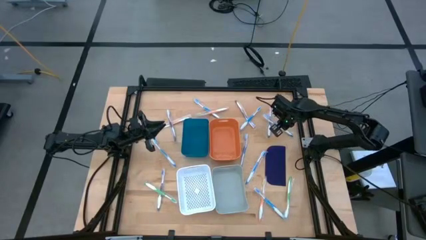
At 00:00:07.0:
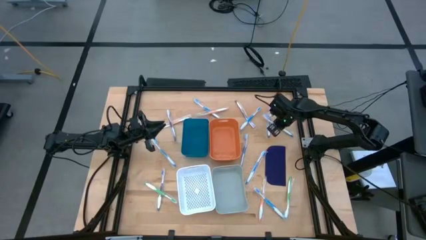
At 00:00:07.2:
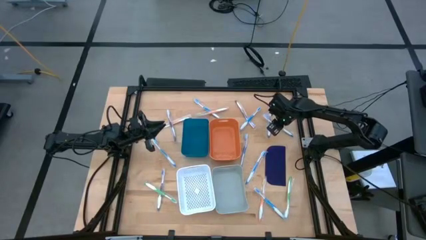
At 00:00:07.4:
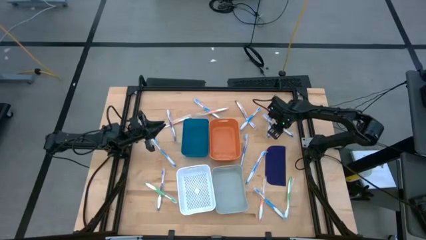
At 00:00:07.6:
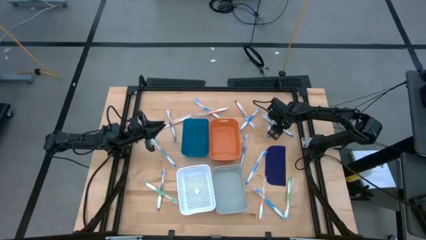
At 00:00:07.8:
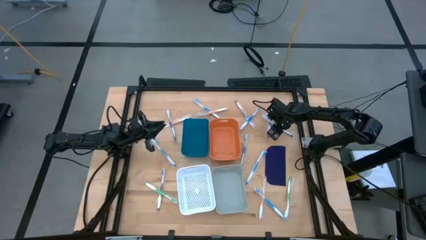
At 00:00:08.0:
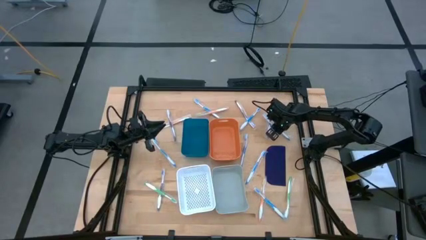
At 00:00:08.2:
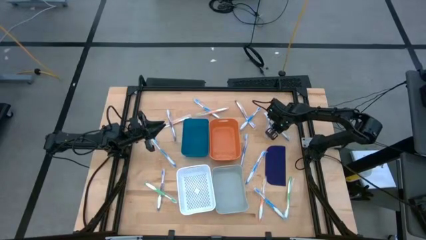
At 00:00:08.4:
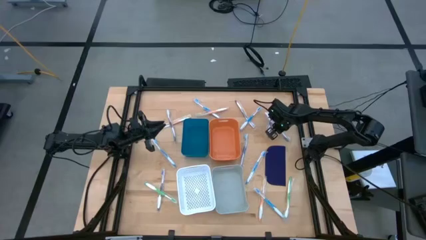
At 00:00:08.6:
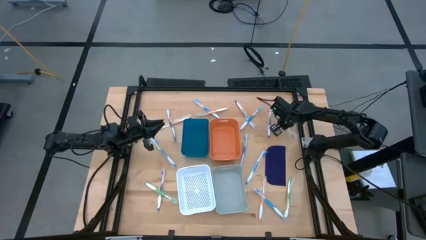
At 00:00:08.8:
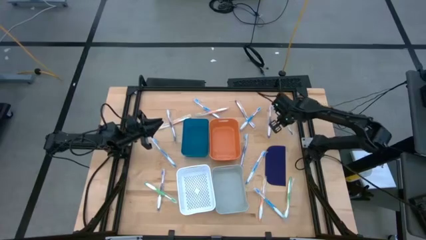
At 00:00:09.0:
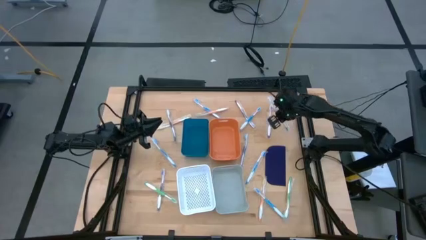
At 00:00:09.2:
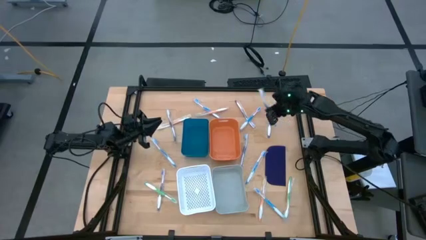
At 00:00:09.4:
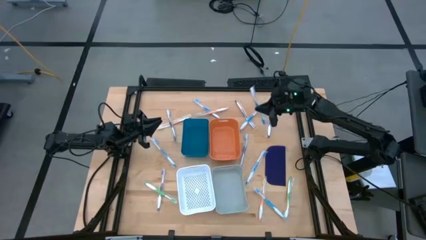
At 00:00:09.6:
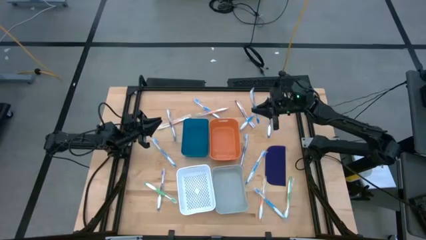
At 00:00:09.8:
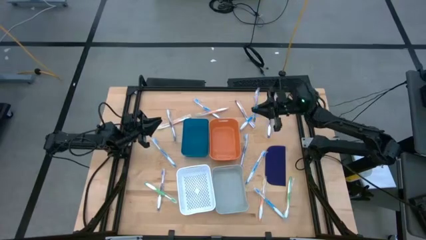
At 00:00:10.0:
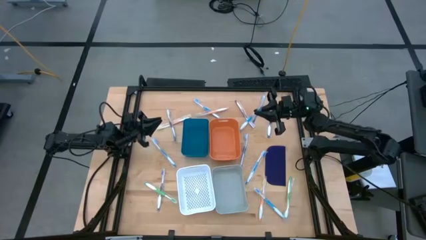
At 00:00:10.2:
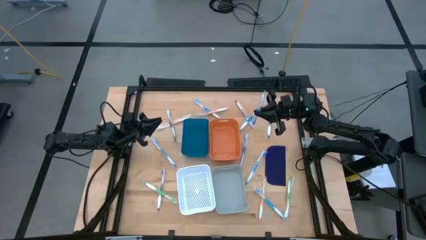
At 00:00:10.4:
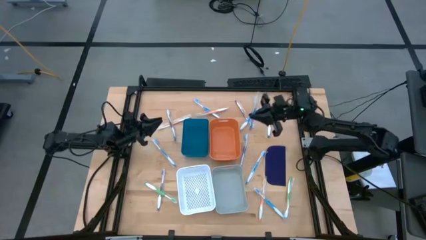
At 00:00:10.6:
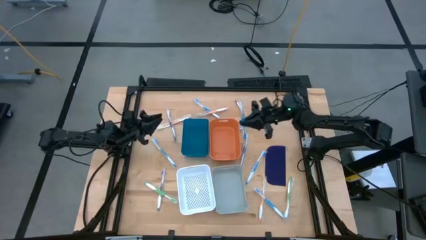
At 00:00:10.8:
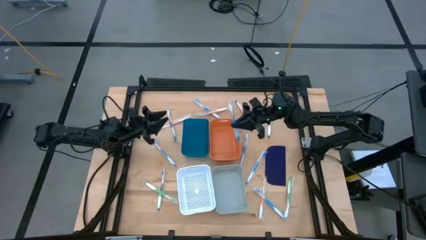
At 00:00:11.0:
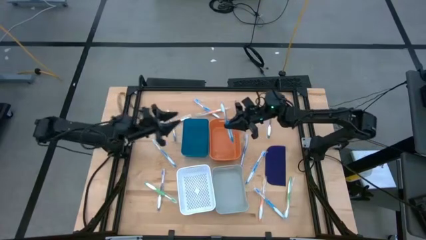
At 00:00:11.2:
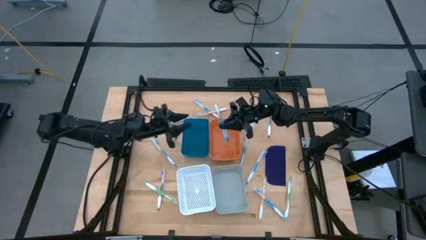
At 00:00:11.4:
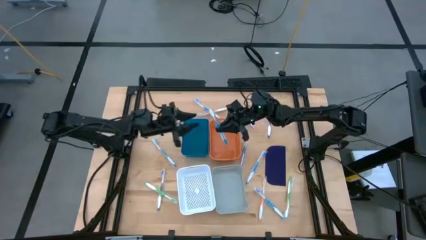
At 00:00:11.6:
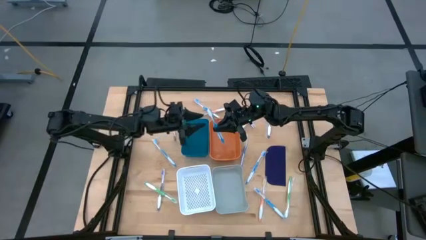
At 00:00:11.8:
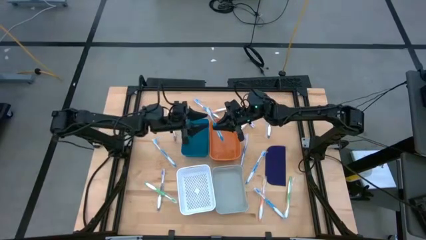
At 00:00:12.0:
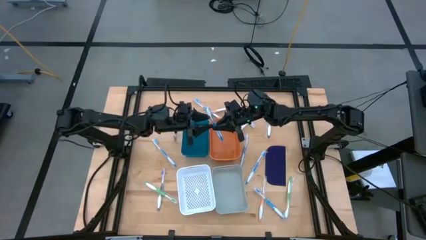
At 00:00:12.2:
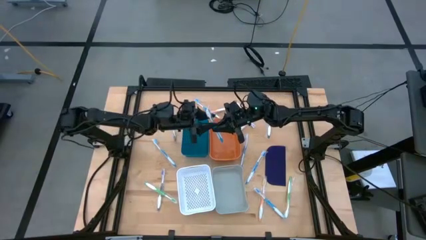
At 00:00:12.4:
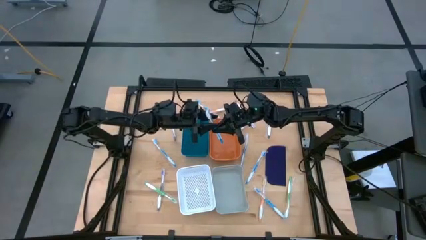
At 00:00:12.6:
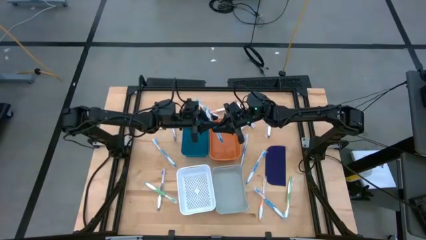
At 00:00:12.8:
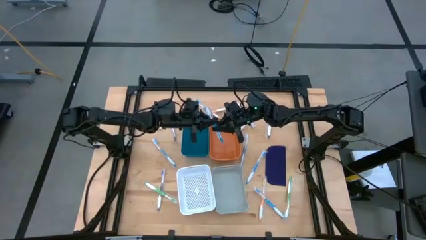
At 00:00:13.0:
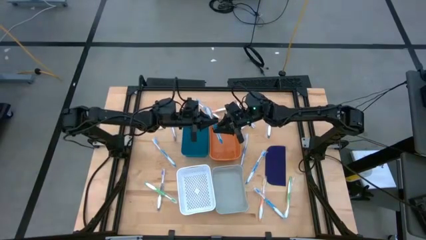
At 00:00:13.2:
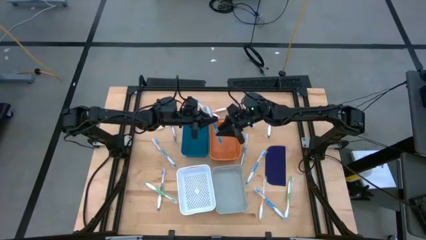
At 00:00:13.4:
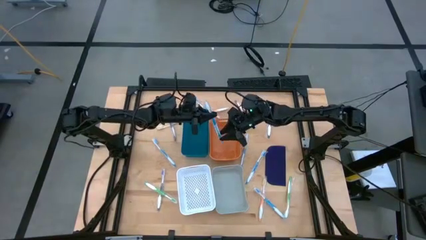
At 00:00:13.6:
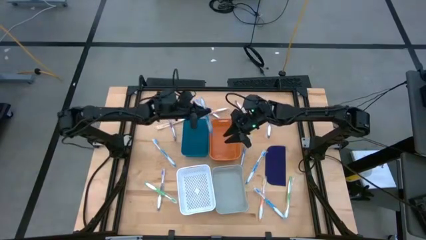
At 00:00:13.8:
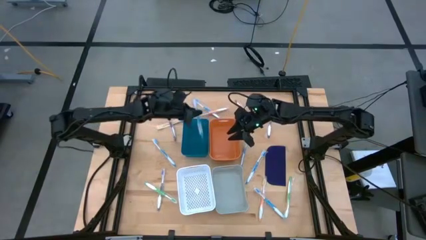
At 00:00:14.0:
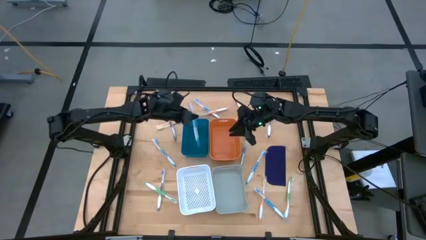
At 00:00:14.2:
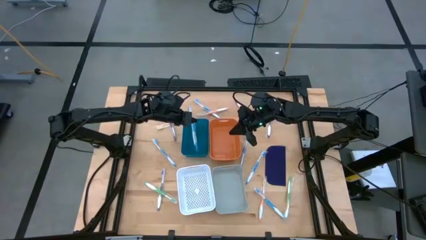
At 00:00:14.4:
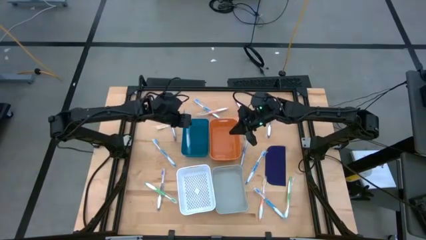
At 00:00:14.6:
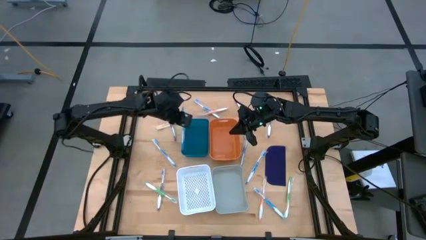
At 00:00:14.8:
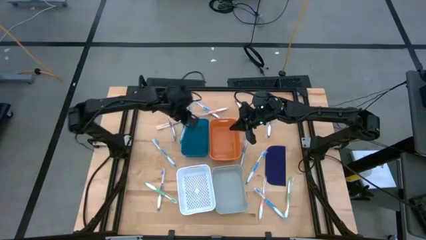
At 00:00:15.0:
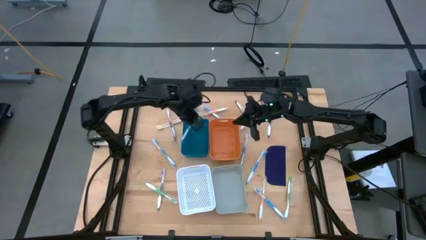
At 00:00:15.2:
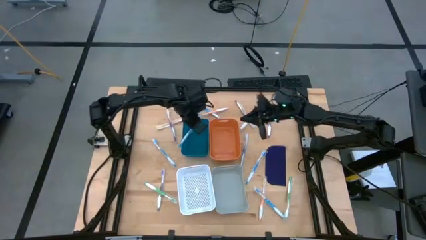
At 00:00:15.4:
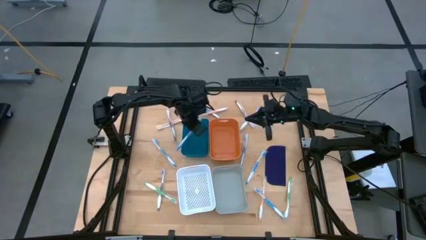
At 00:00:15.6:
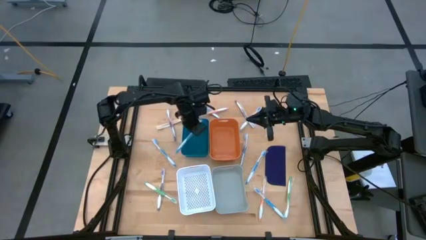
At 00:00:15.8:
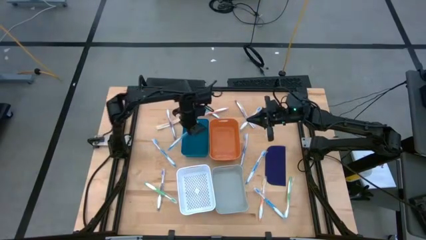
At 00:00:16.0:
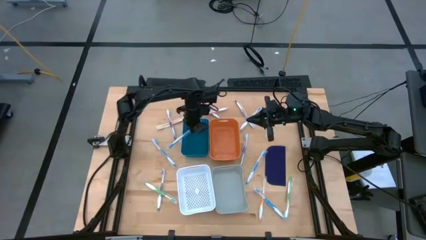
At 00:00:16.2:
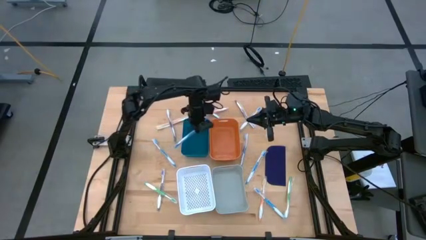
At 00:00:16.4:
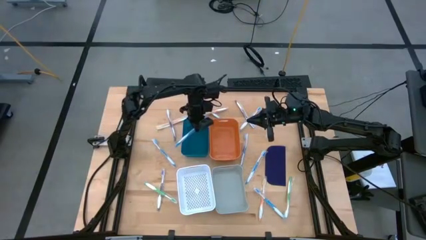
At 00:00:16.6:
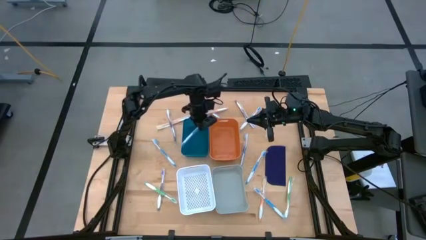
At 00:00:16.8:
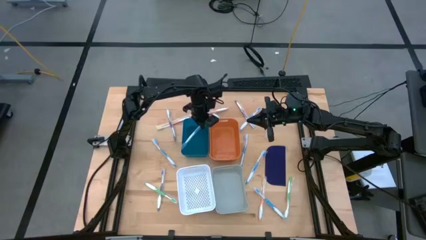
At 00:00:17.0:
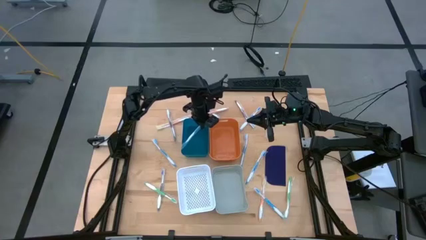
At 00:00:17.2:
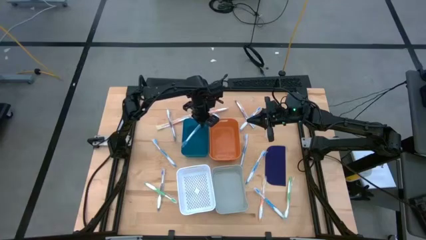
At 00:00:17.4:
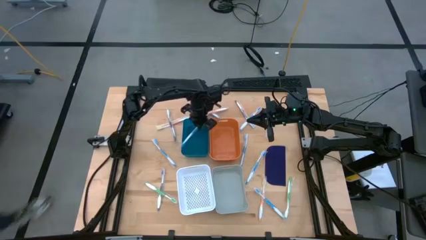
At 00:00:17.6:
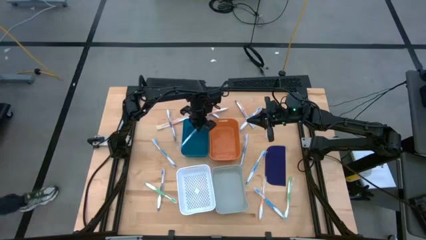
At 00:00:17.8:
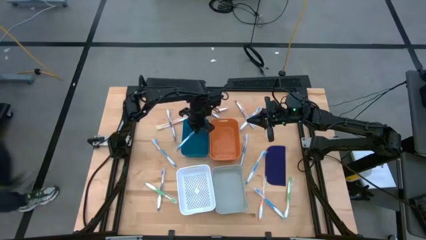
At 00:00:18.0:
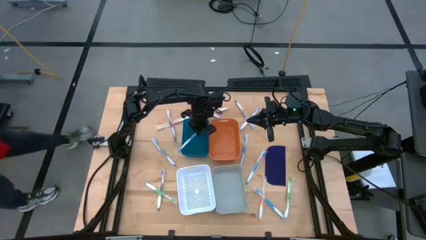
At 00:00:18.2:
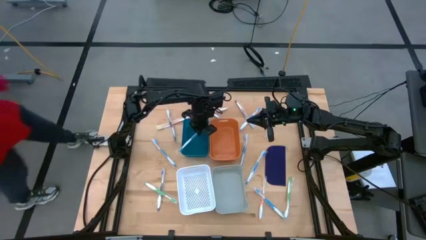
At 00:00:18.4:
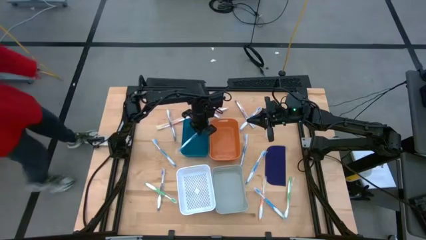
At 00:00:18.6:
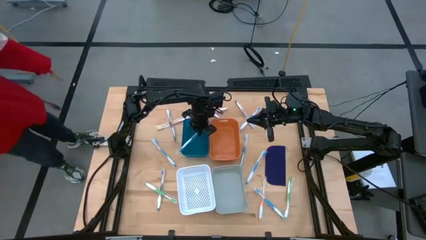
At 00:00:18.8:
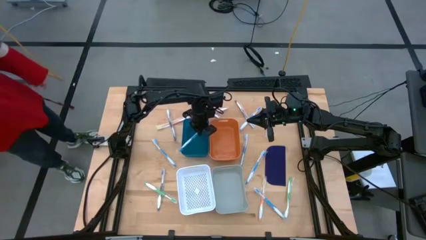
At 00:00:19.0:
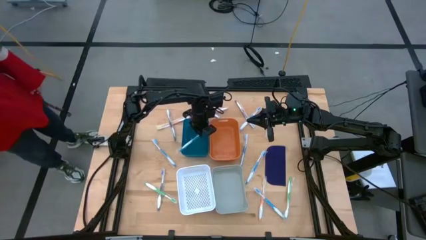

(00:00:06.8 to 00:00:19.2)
Task: Pick & Place Toothbrushes
Put the blue toothbrush into the blue bin

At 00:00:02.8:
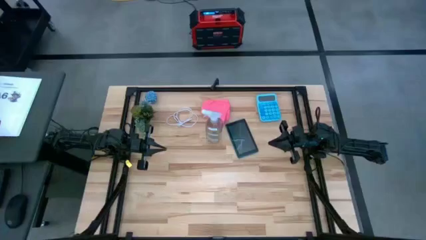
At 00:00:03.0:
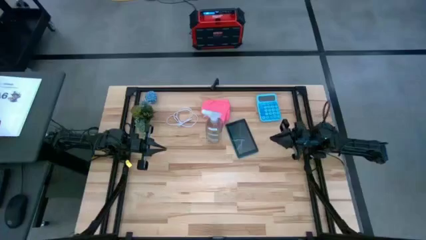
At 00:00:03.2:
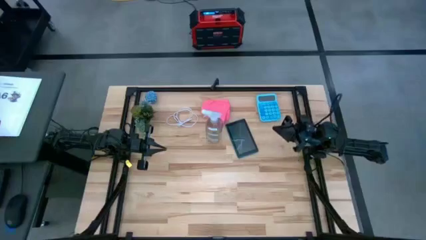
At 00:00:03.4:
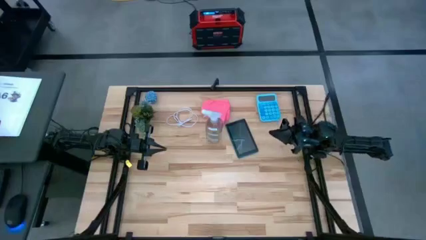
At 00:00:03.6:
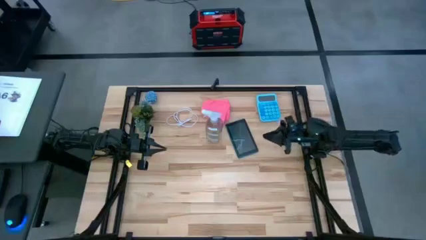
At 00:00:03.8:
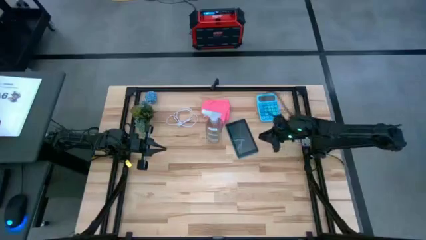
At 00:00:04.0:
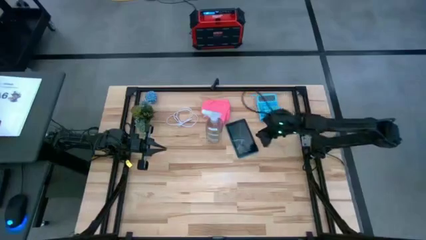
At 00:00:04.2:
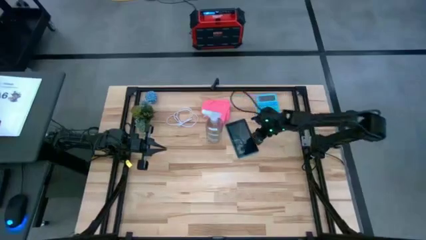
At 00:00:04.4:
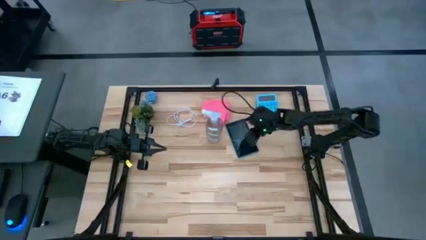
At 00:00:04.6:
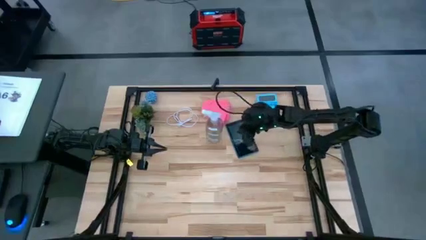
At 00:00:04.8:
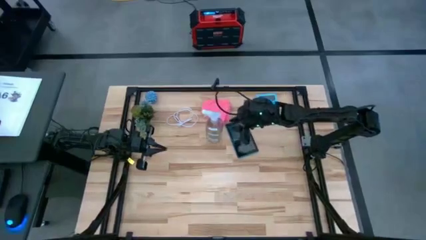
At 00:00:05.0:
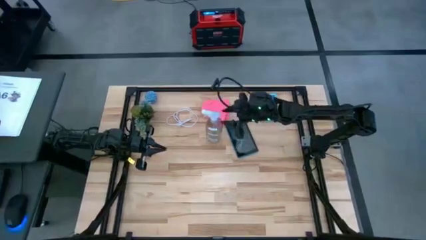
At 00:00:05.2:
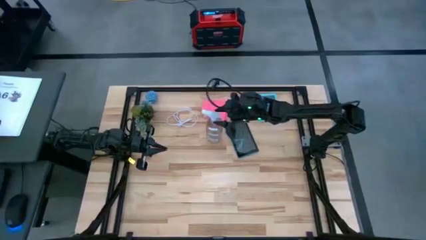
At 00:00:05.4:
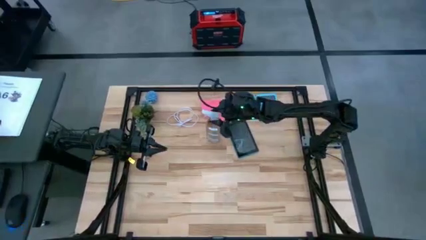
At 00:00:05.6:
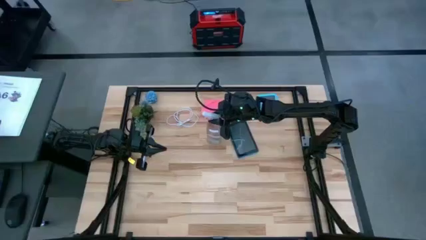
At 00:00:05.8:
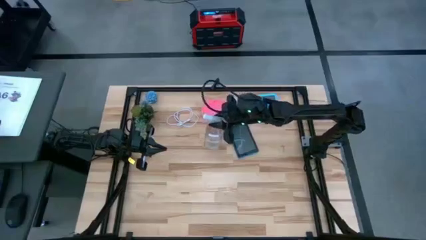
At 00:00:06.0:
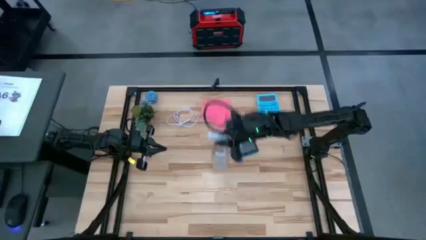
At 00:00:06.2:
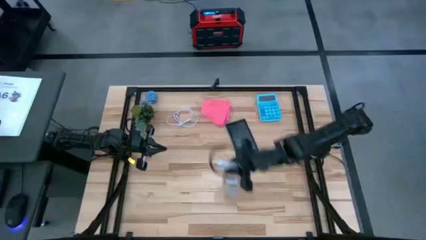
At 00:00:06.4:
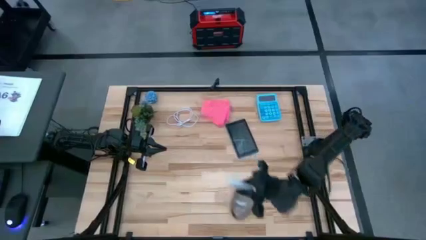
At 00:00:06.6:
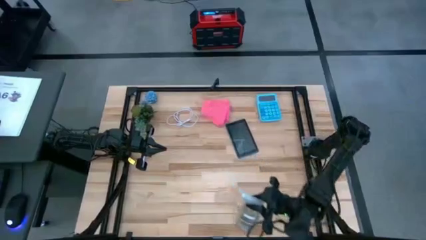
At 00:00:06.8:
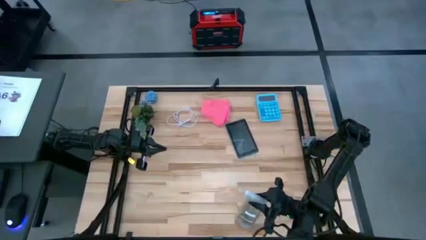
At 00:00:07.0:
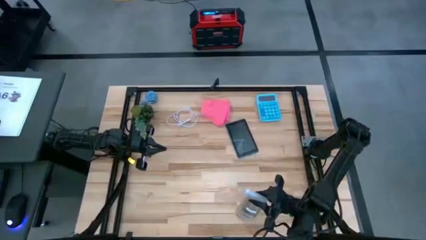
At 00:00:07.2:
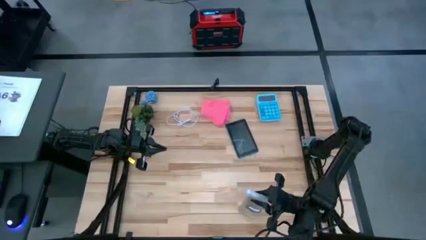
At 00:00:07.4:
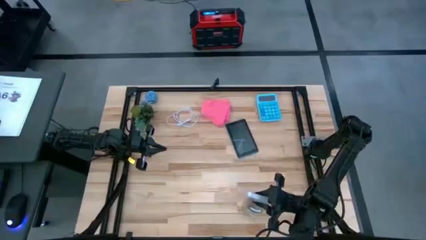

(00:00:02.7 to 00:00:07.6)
Task: Apply microfiber cloth
Move the spray bottle to the bottom right of the table
